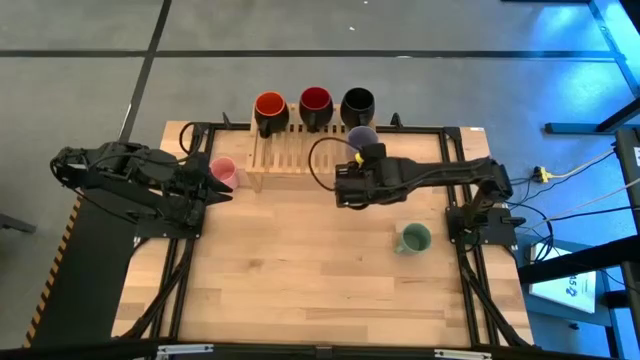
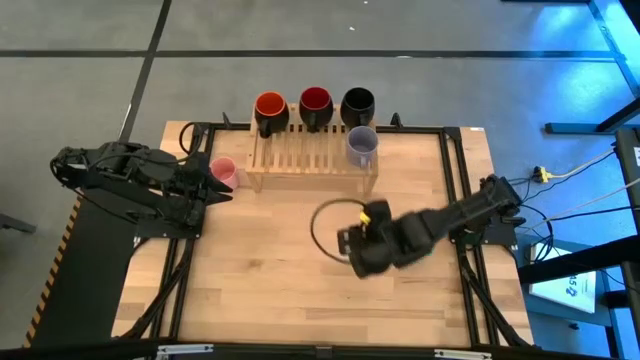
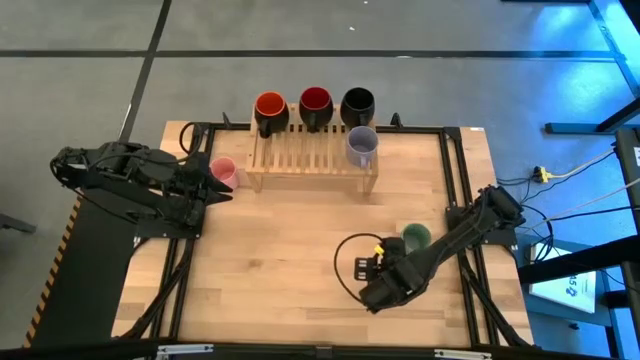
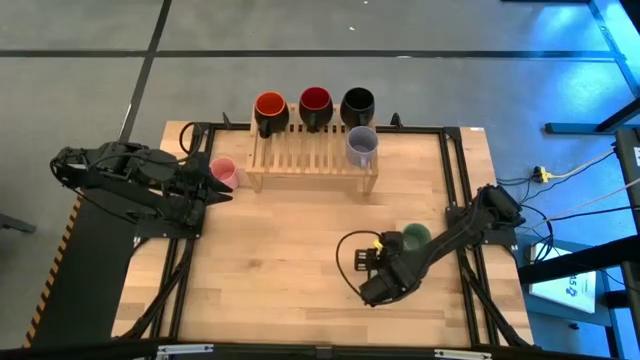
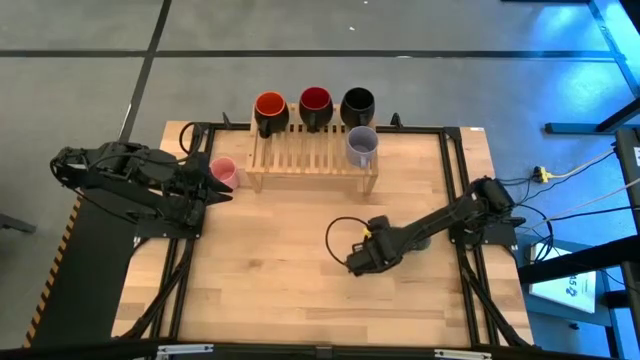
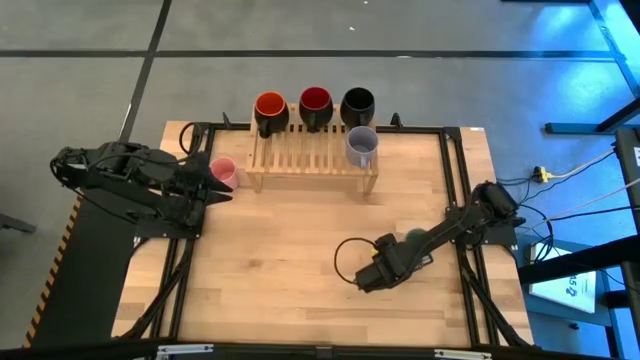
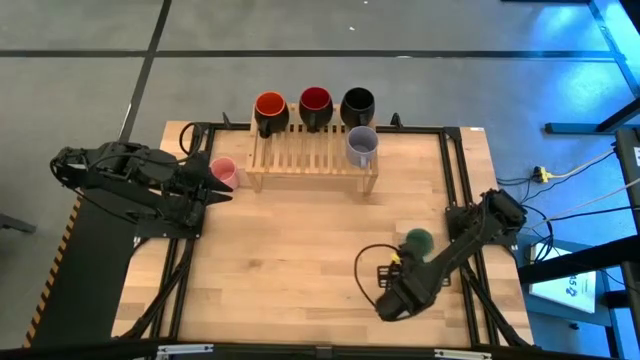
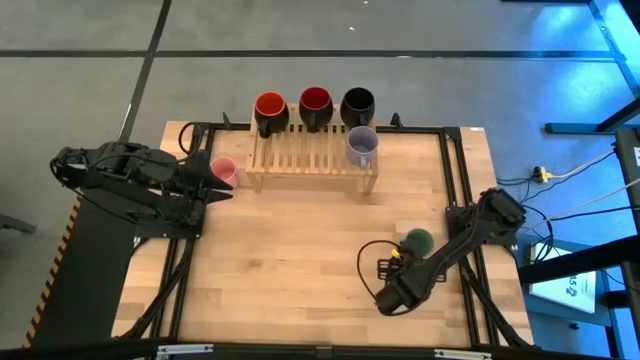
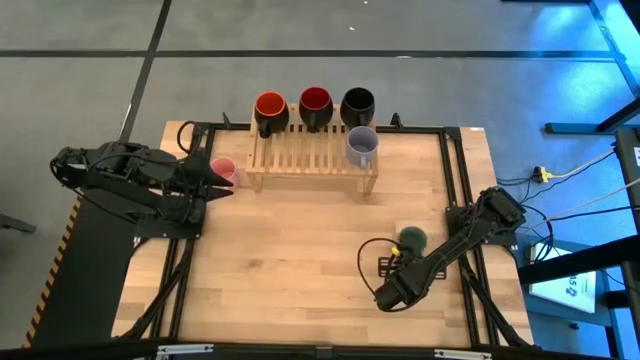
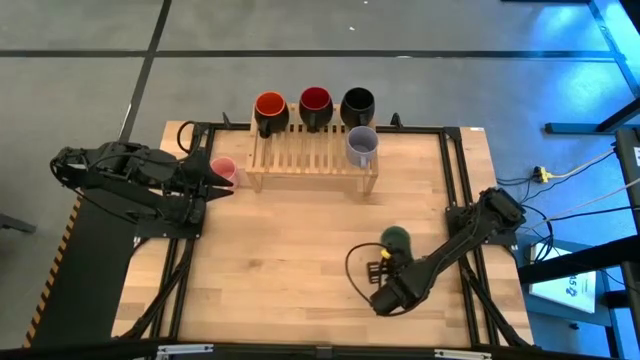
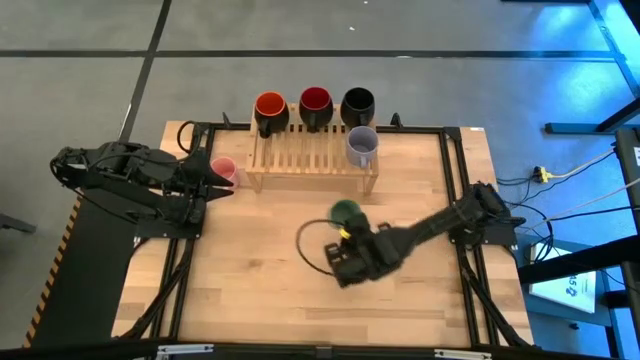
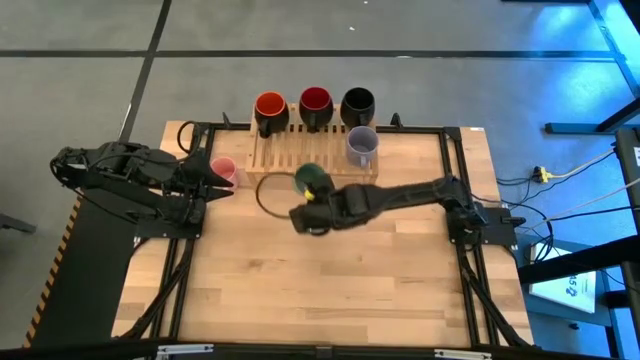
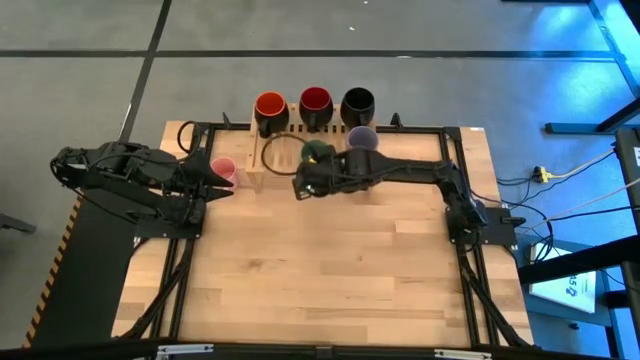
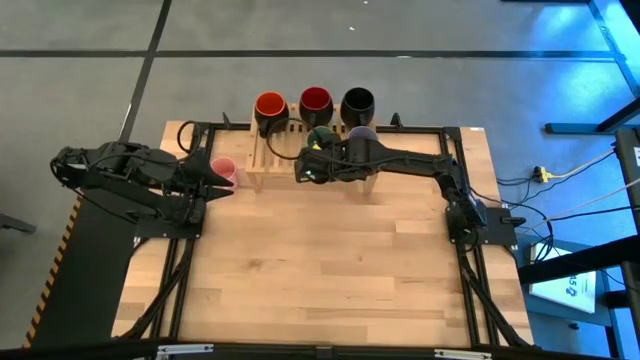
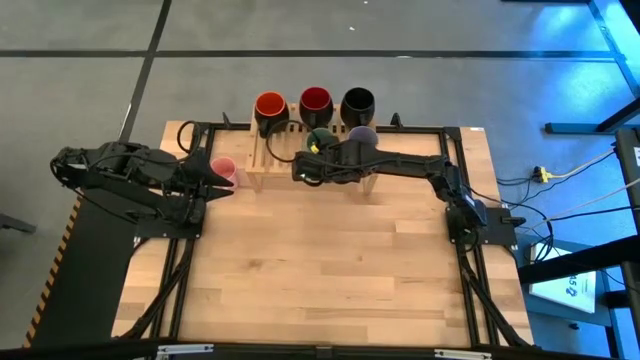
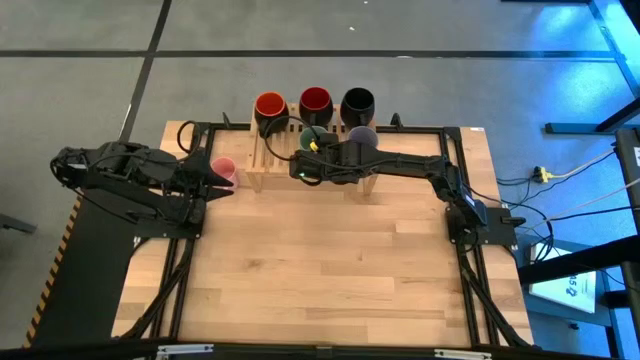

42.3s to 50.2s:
Task: Place coffee mugs
Put the green mug on the shelf

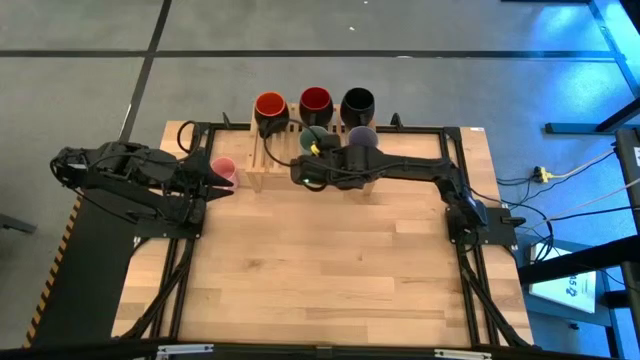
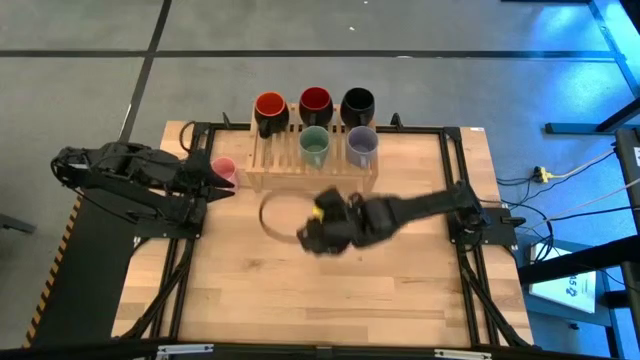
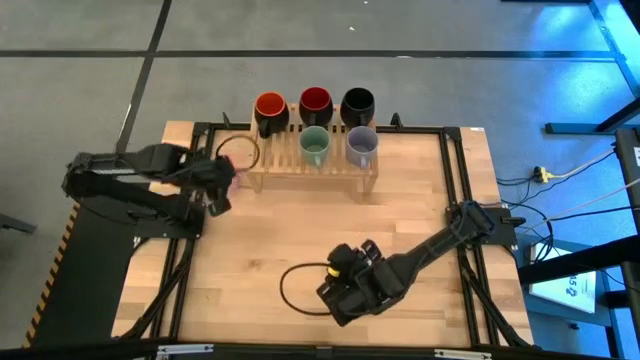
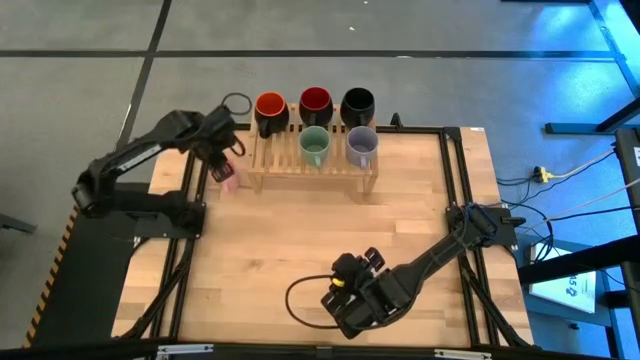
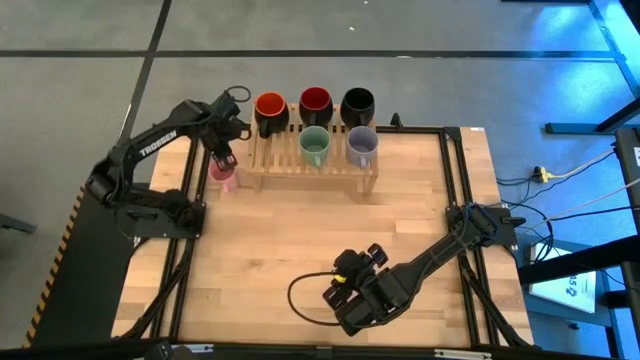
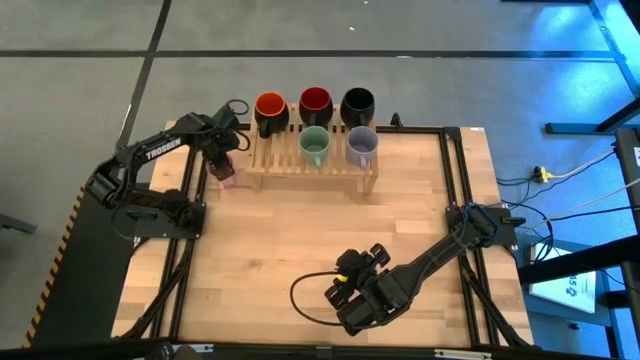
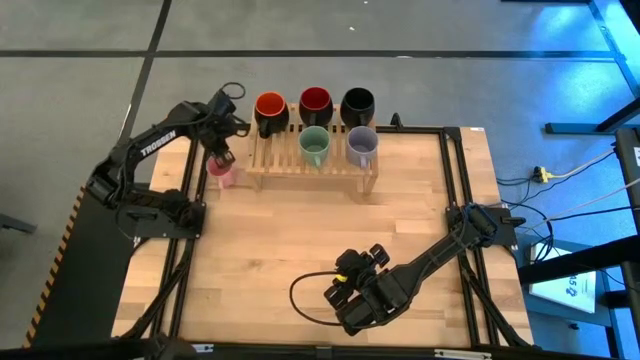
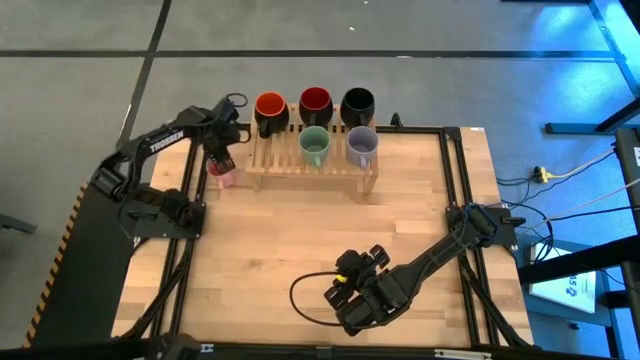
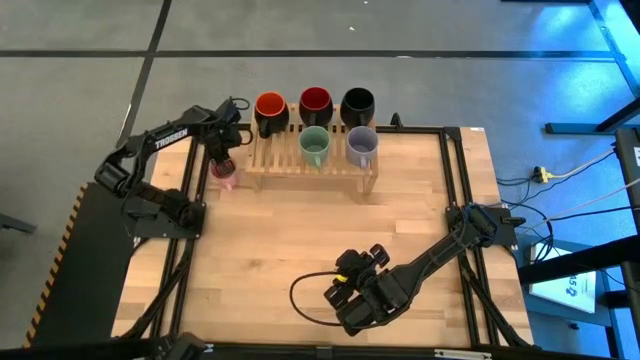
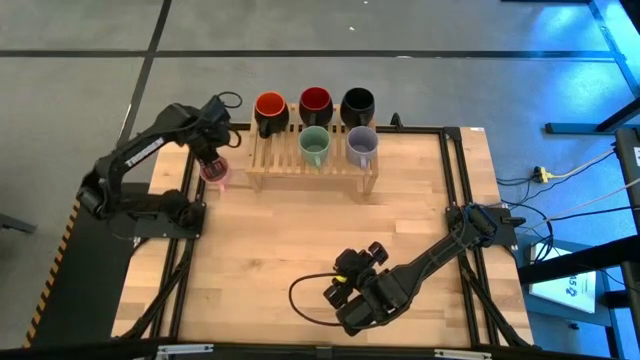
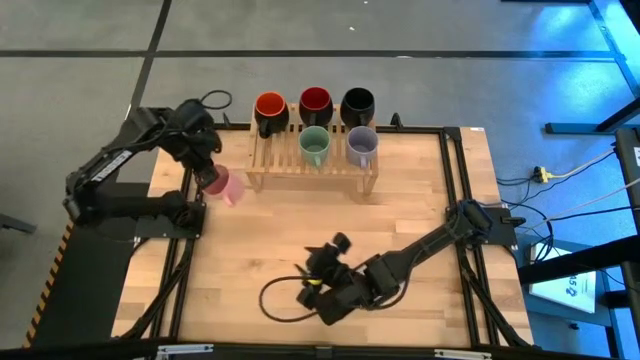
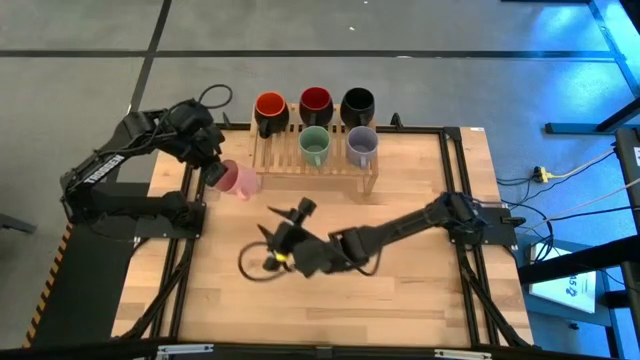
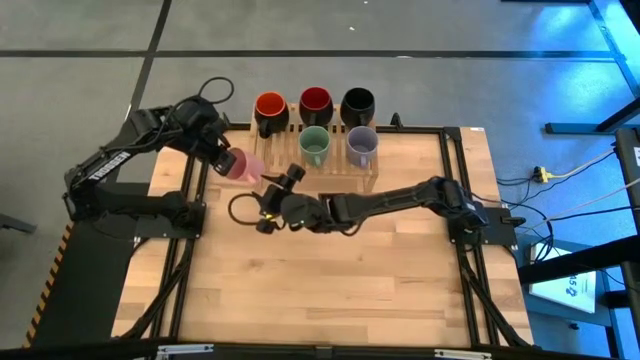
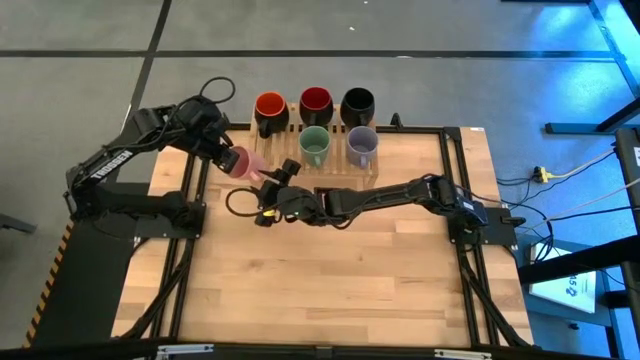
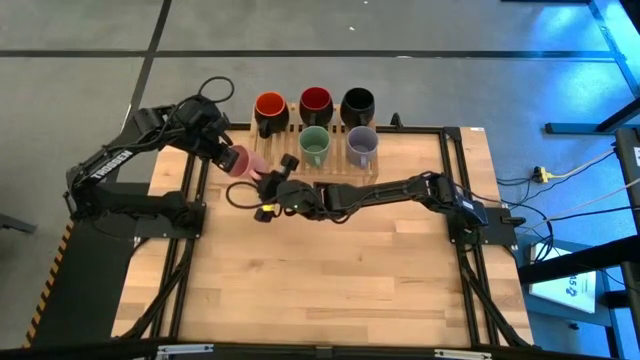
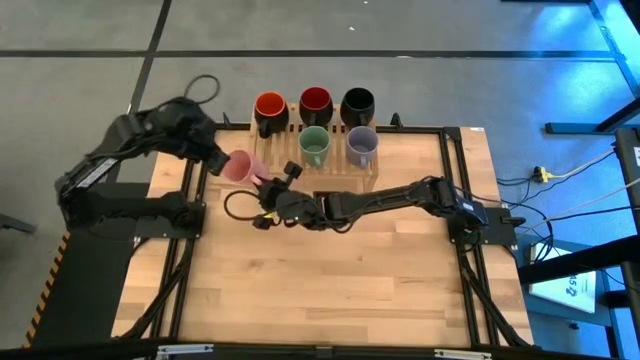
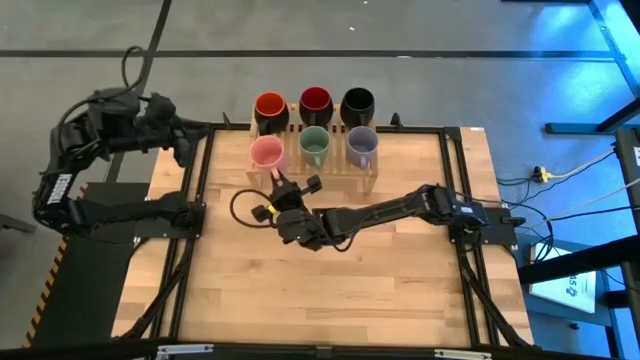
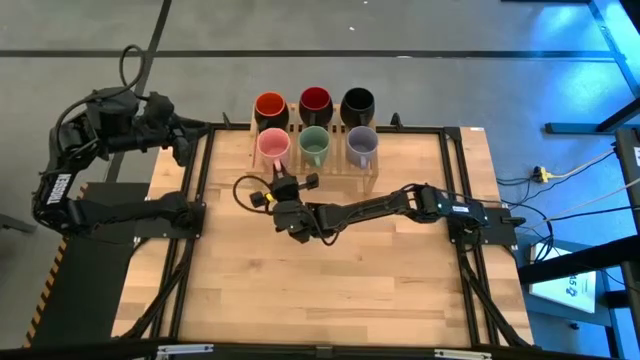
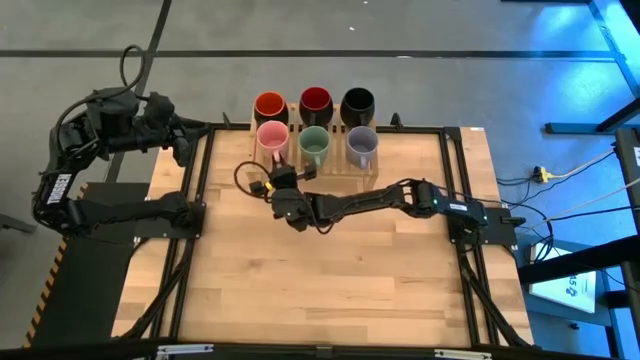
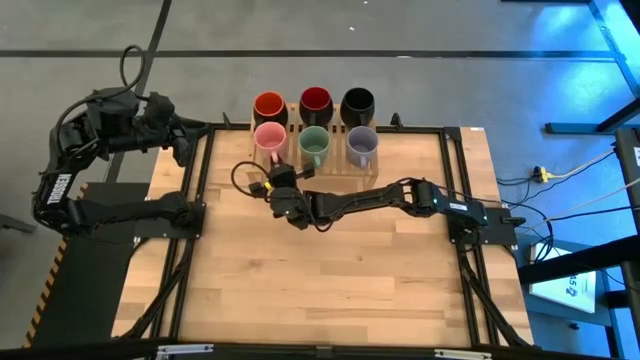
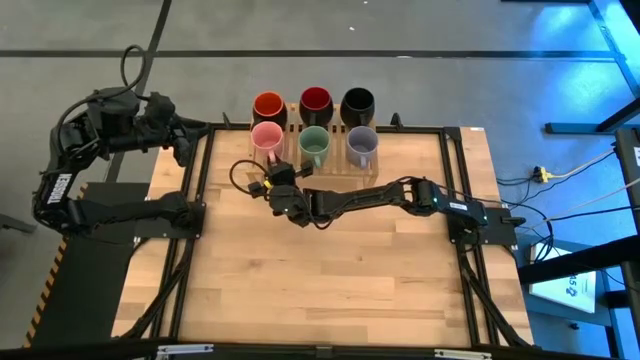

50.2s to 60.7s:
Put the pink mug on the shelf

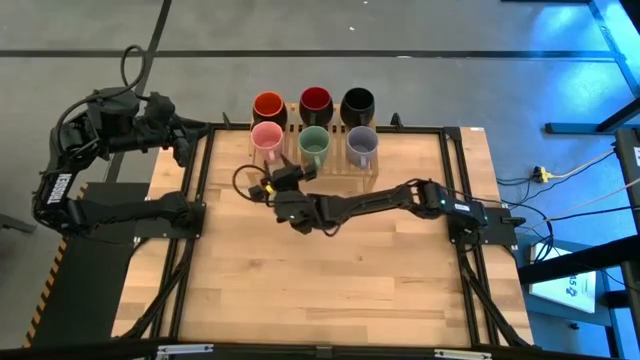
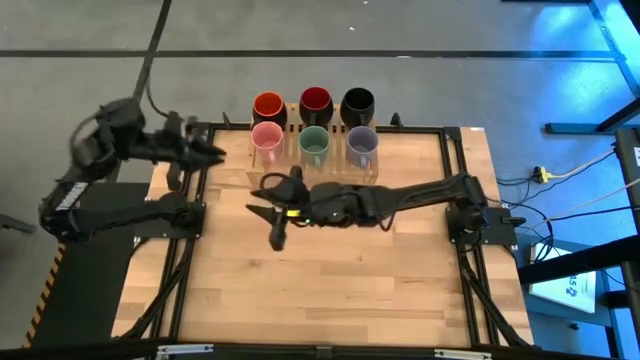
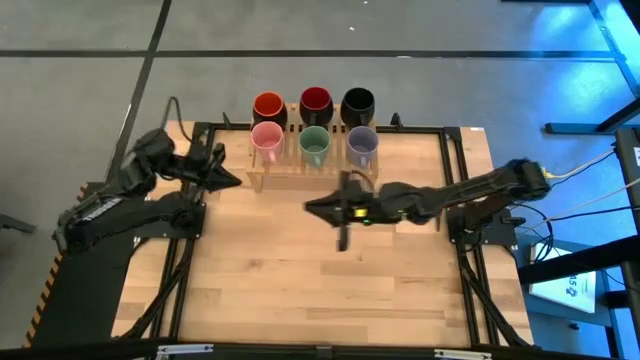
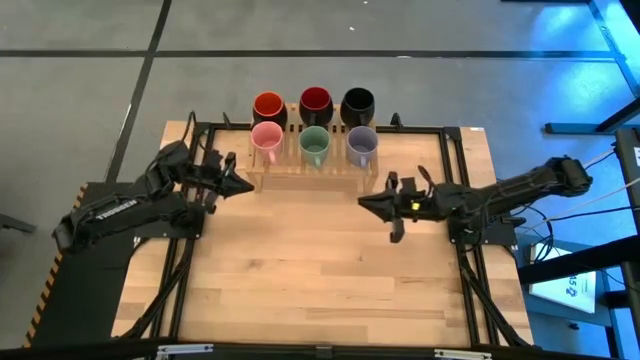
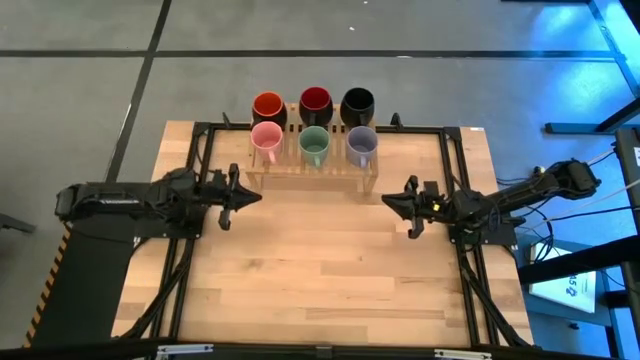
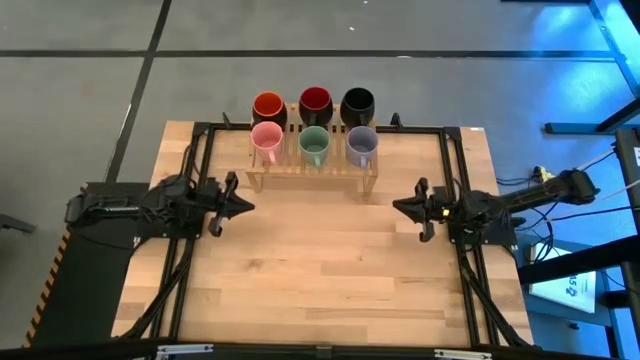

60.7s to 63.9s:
Return to Home Position
